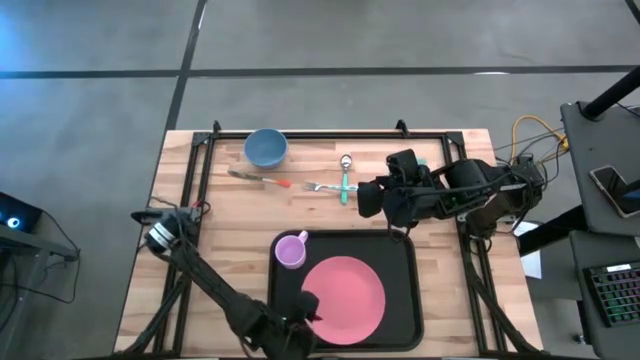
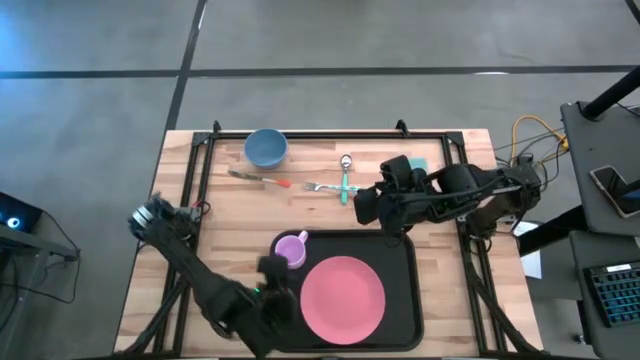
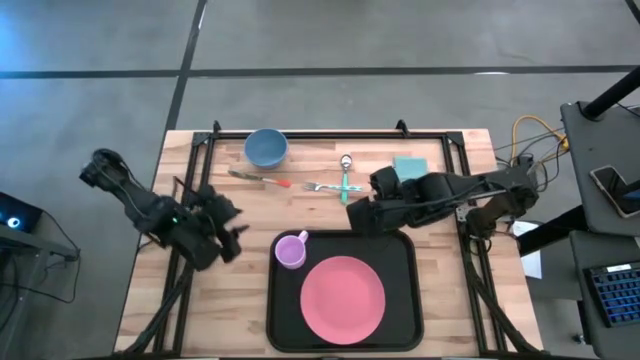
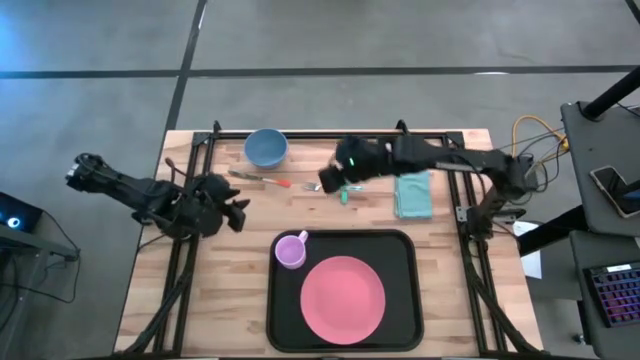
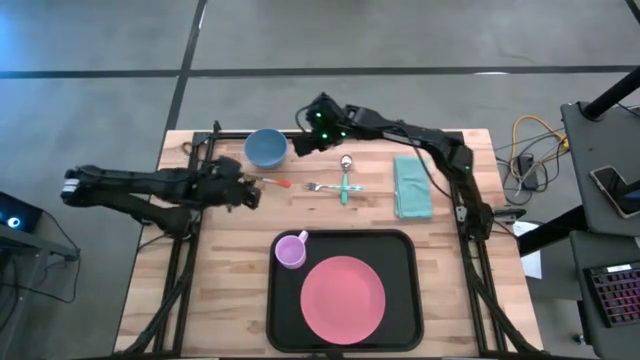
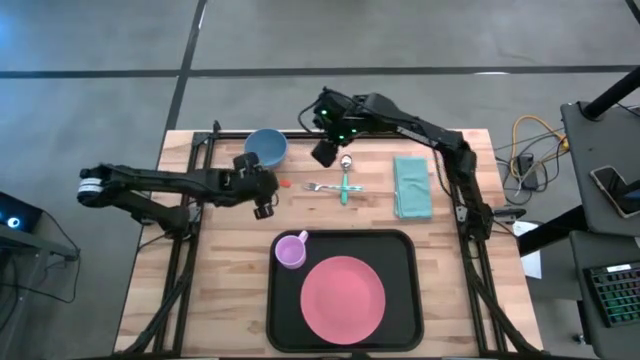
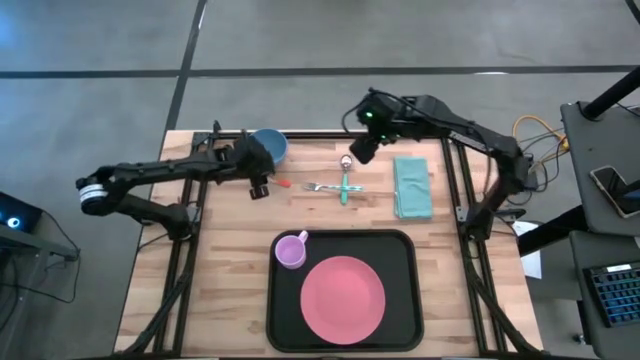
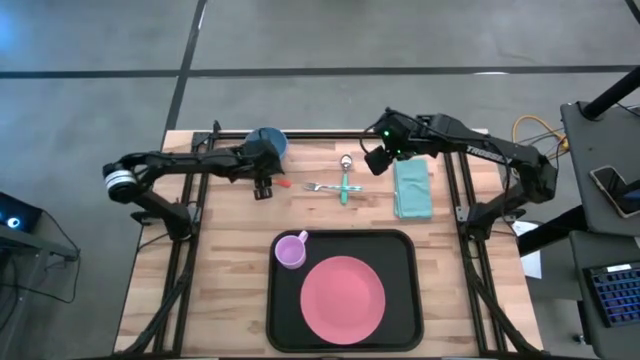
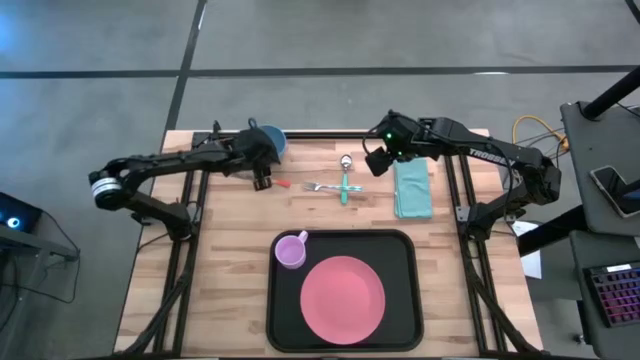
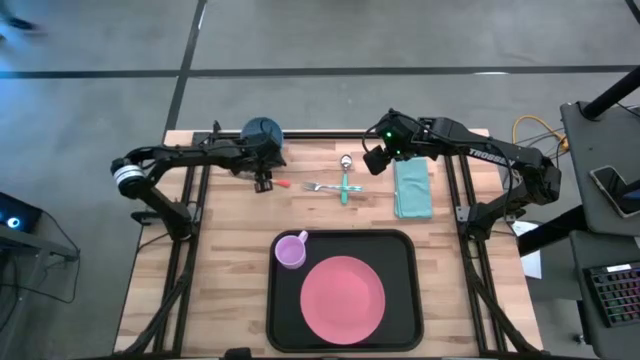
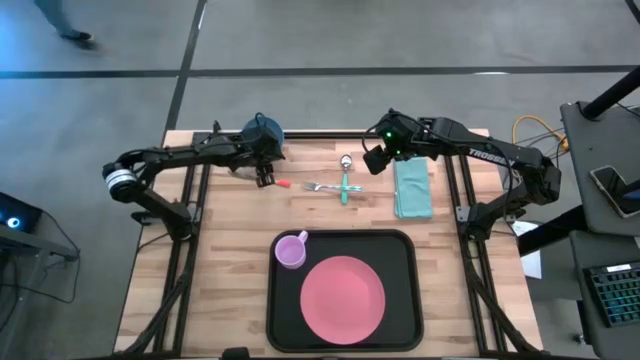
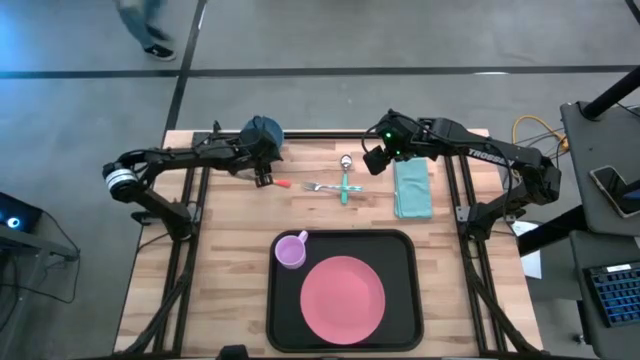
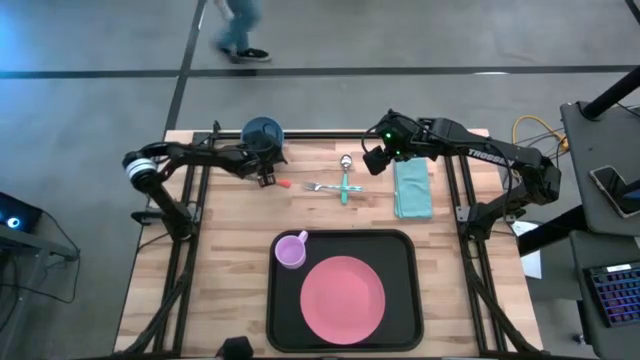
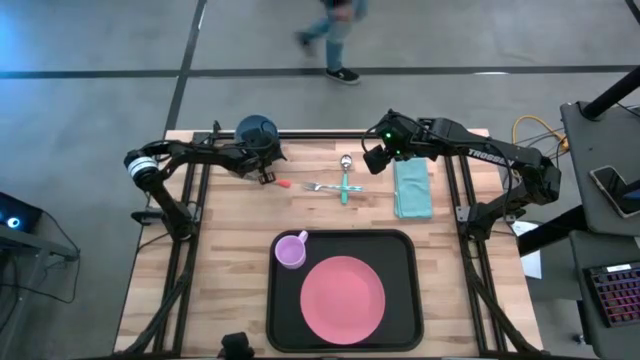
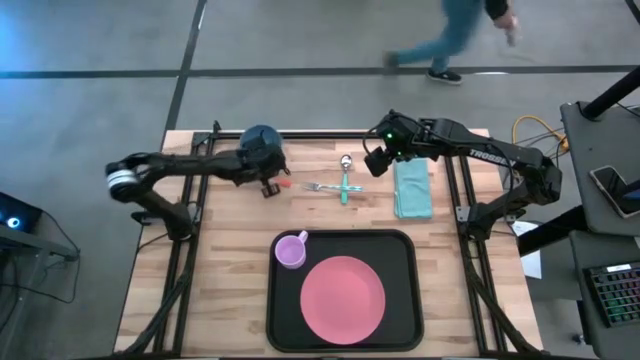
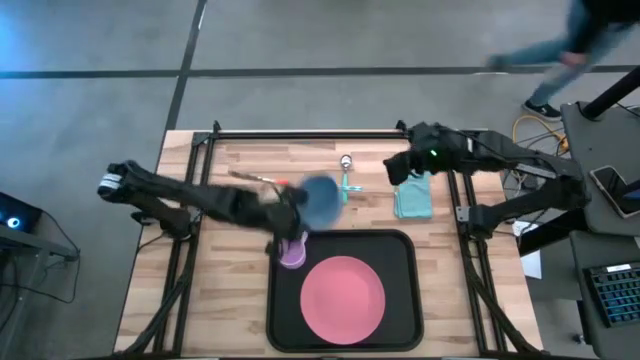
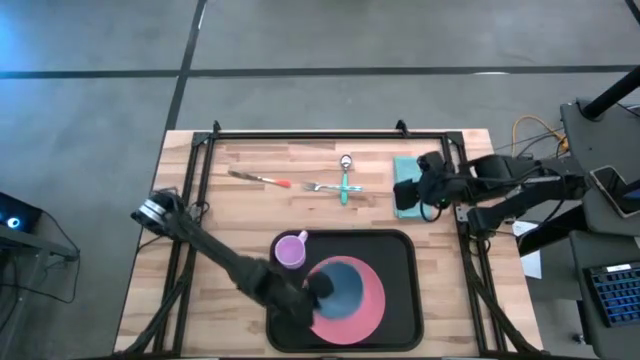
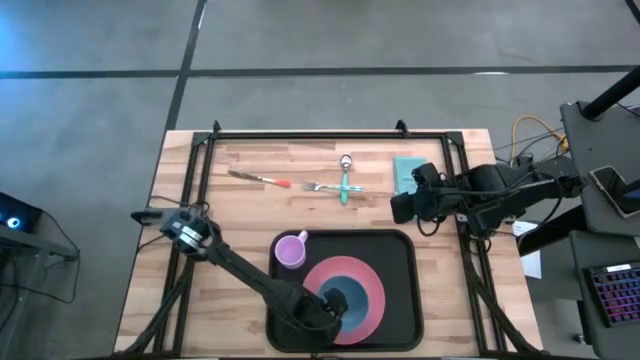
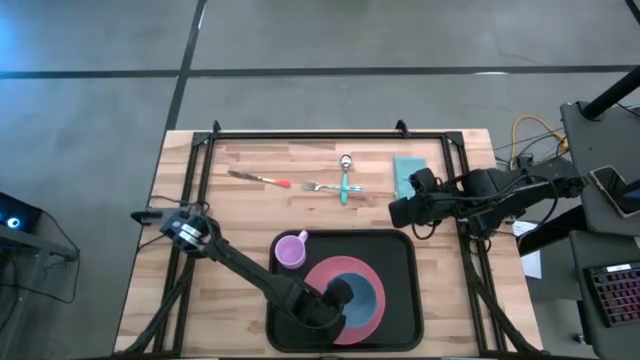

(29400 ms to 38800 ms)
Task: Set up tray
Put the blue bowl on the pink plate to the bottom right of the purple mug

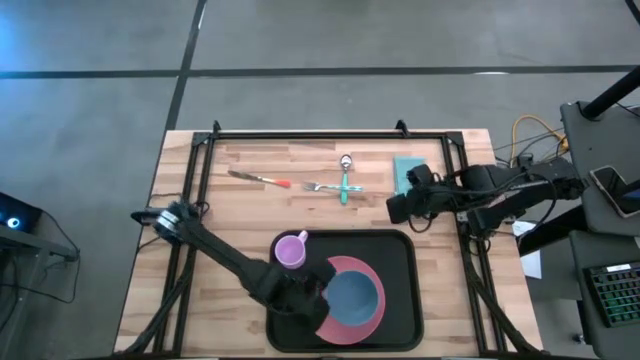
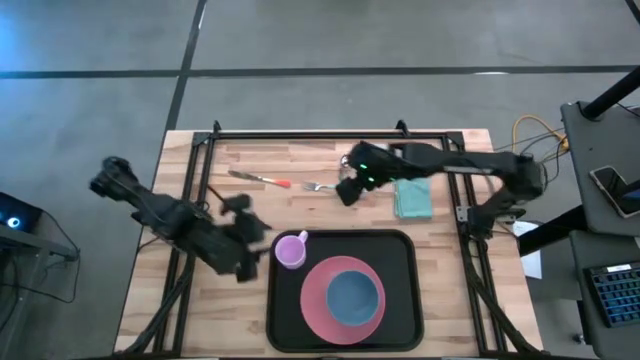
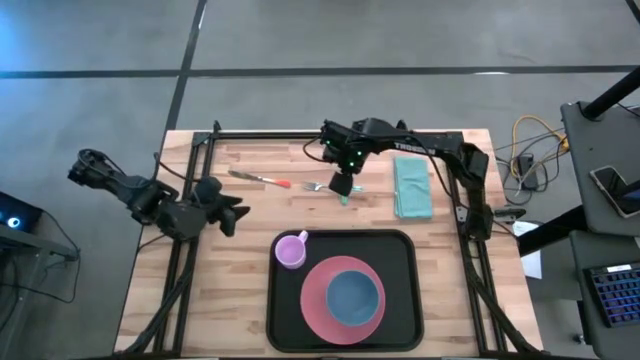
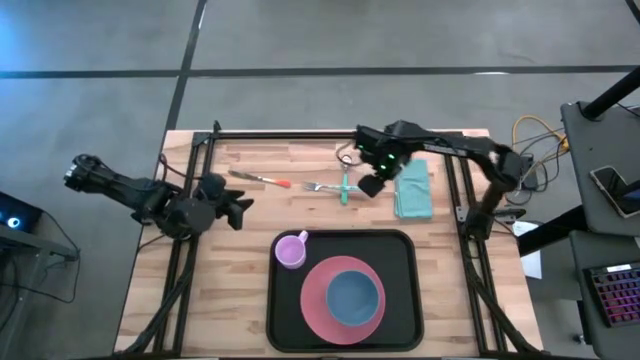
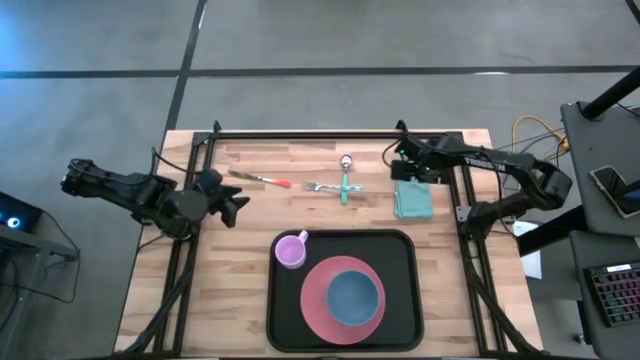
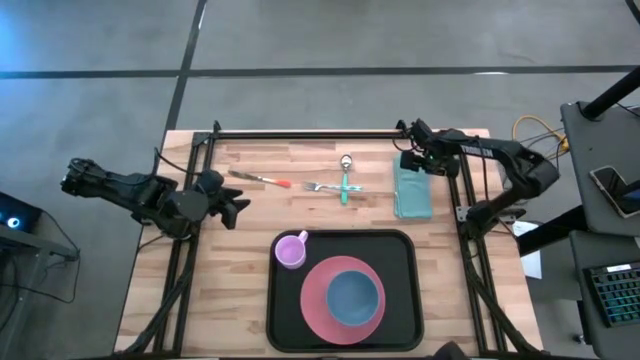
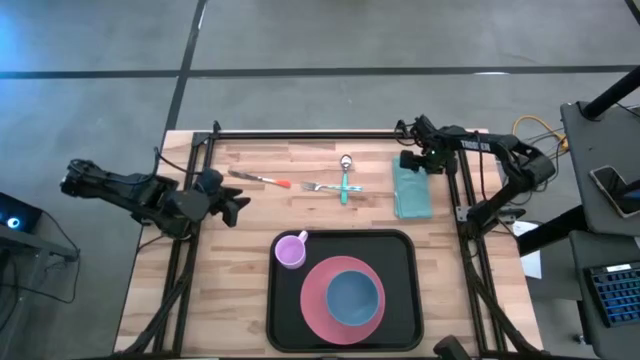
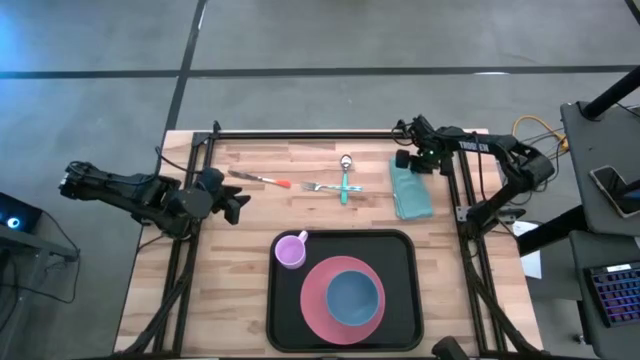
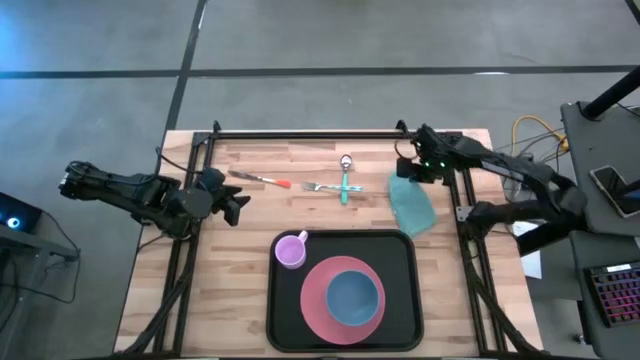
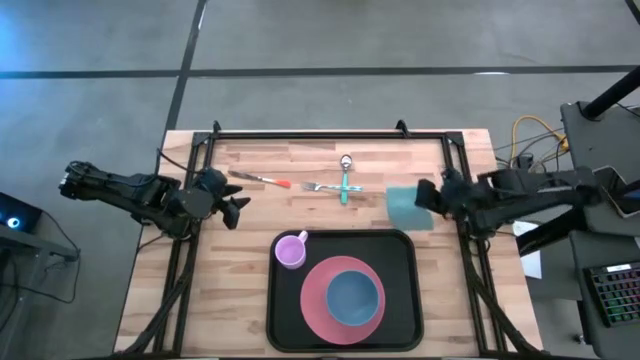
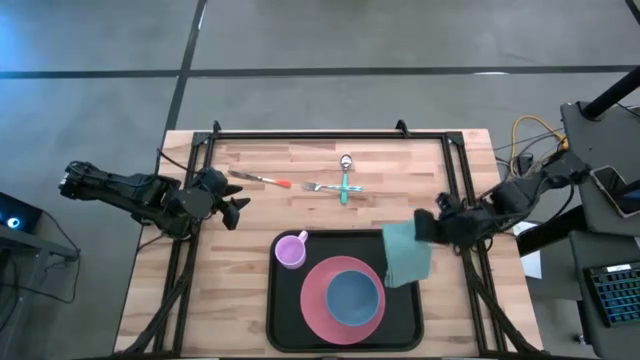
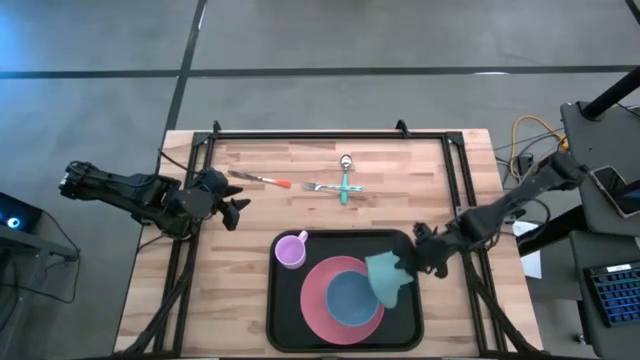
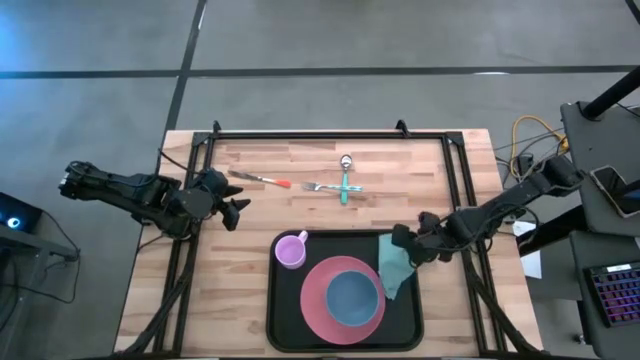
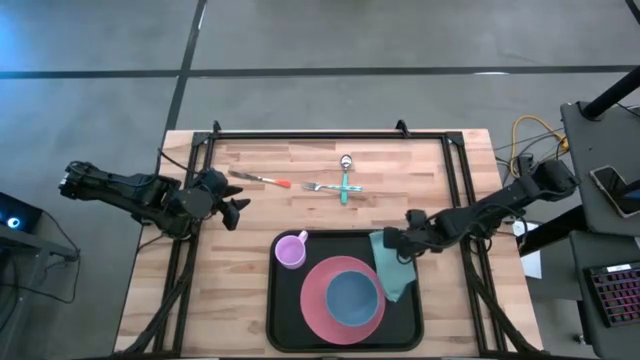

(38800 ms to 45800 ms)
Put the blue napkin on the black tray to the right of the pink plate

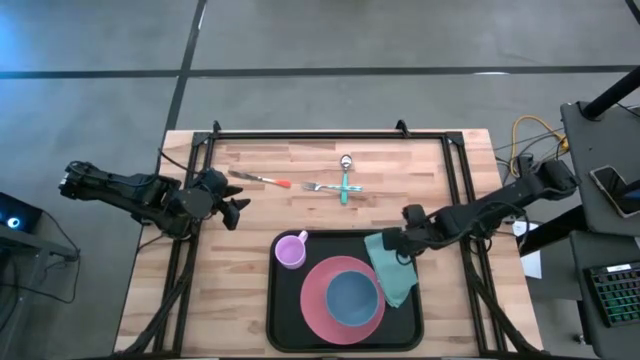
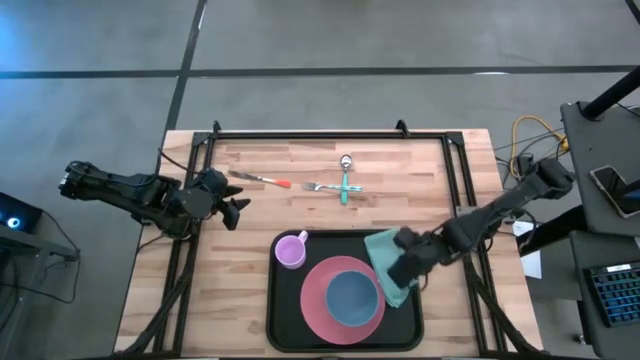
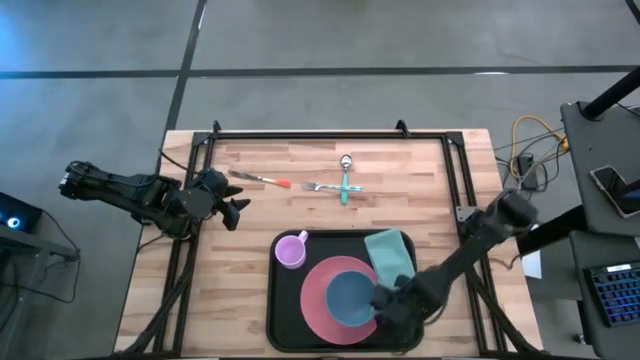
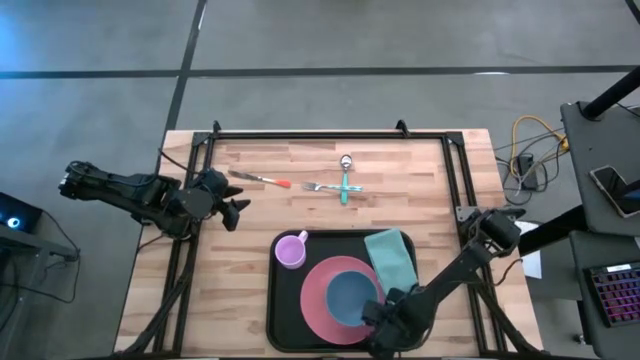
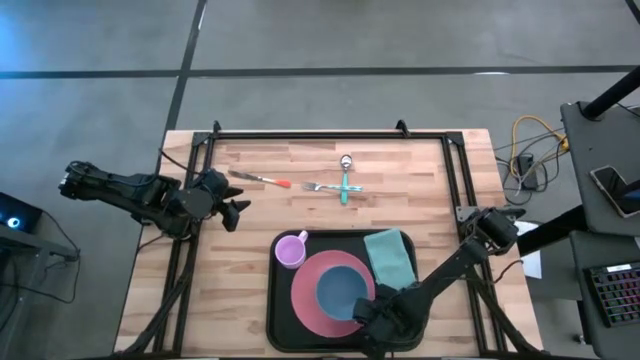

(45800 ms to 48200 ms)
Adjust the pink plate on the black tray

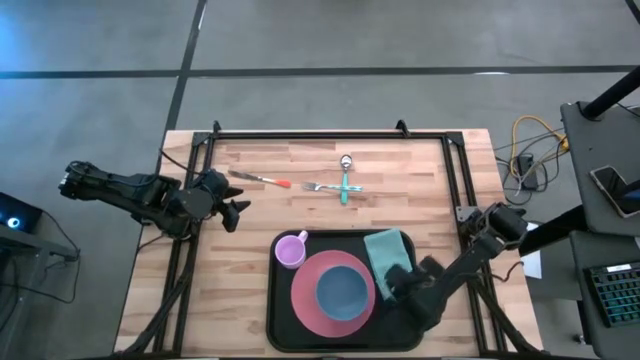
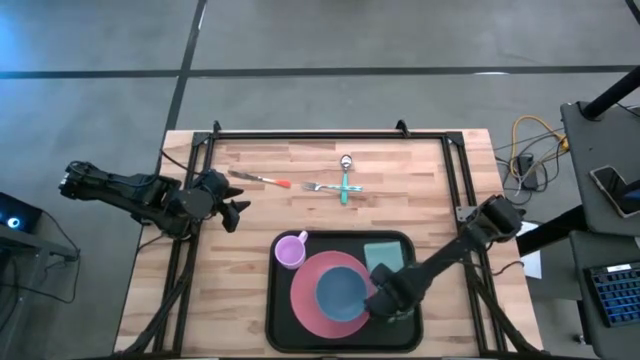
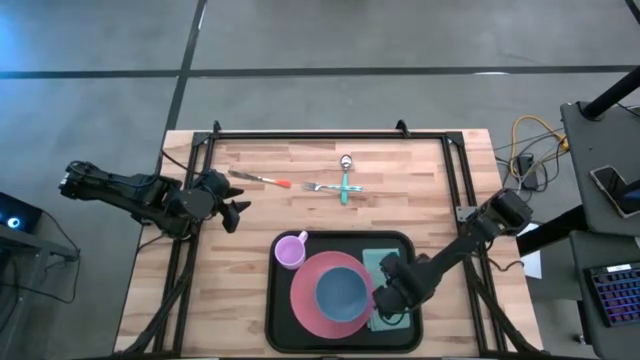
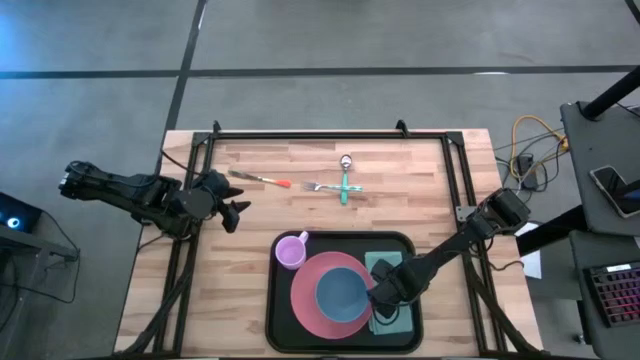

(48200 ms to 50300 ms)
Adjust the blue napkin on the black tray

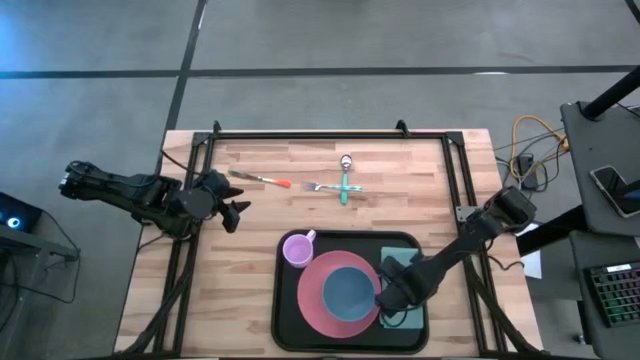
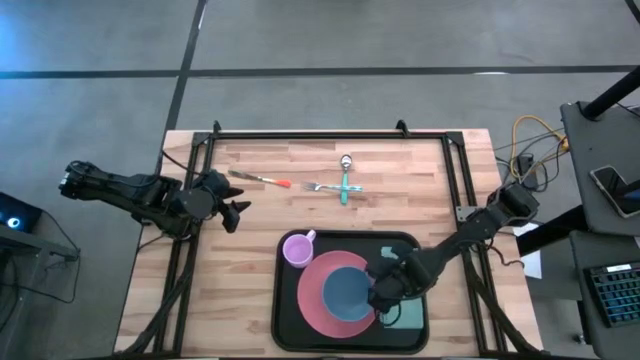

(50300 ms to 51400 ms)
Adjust the blue bowl on the pink plate
